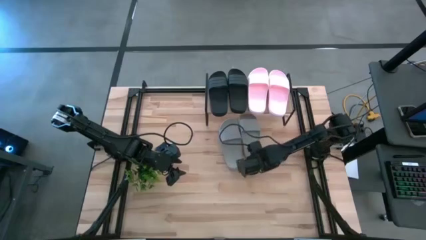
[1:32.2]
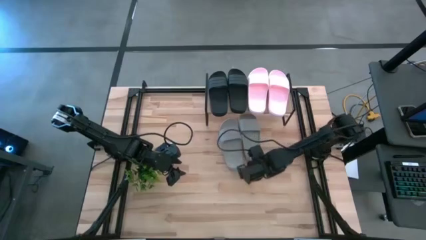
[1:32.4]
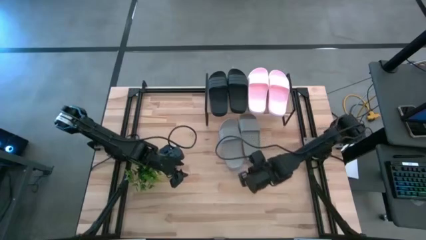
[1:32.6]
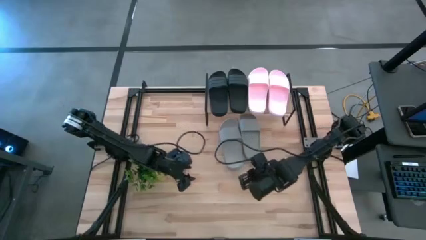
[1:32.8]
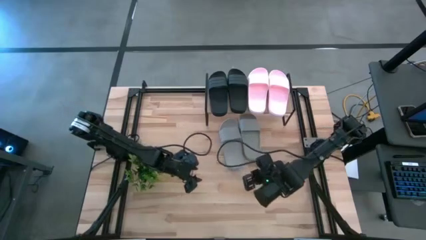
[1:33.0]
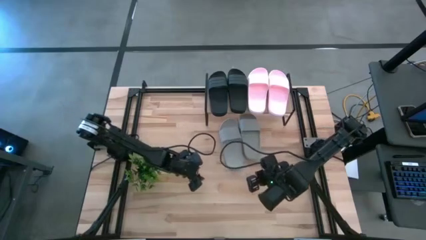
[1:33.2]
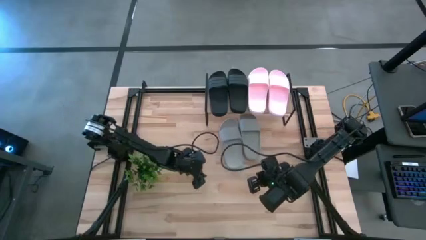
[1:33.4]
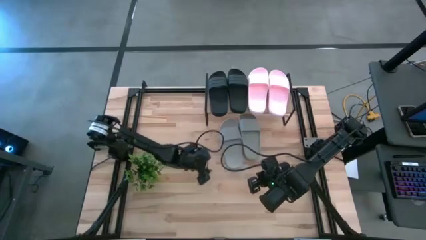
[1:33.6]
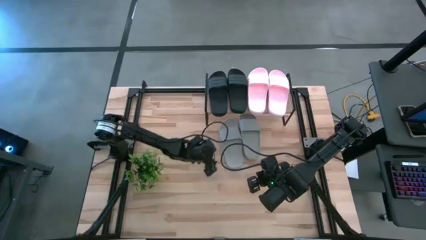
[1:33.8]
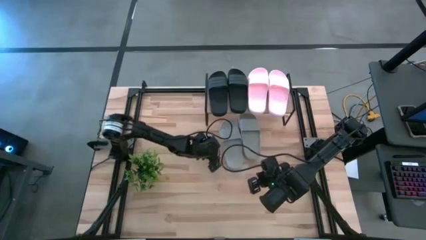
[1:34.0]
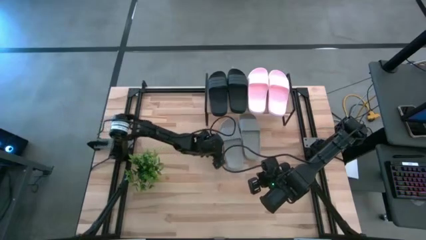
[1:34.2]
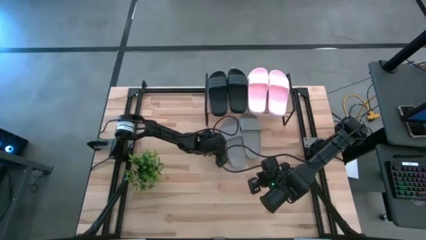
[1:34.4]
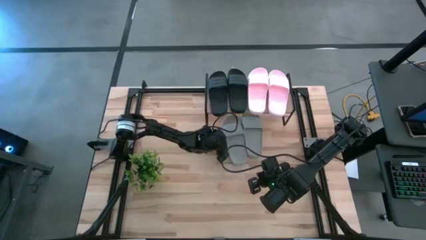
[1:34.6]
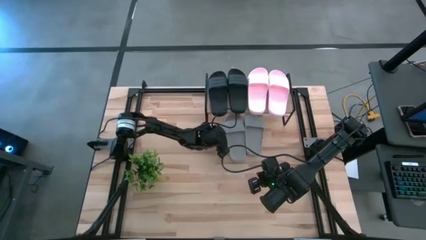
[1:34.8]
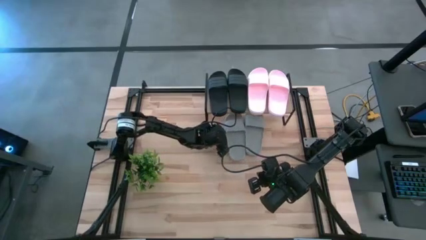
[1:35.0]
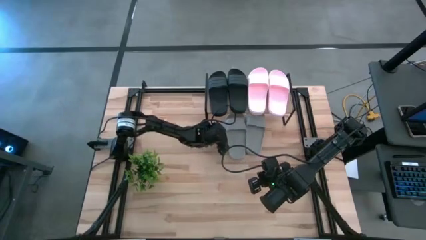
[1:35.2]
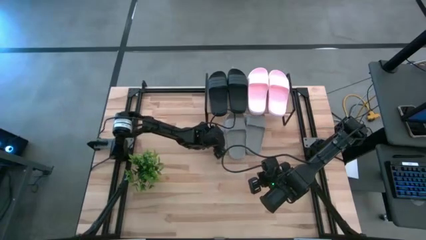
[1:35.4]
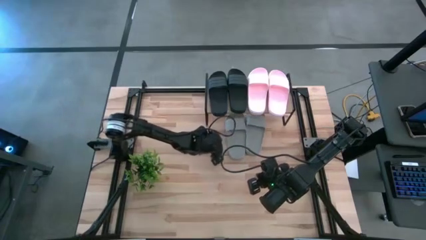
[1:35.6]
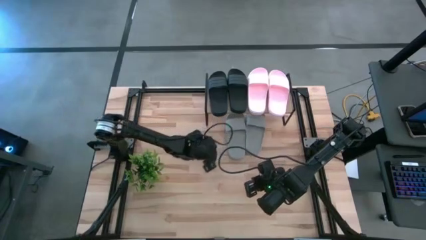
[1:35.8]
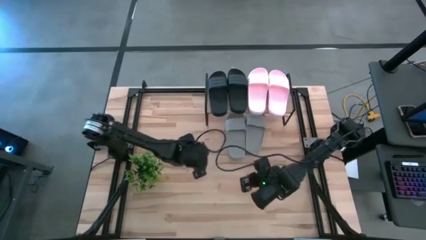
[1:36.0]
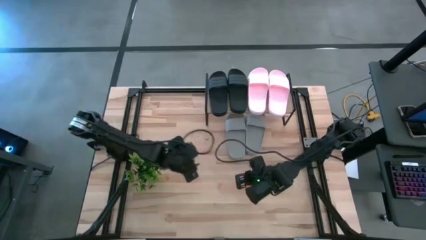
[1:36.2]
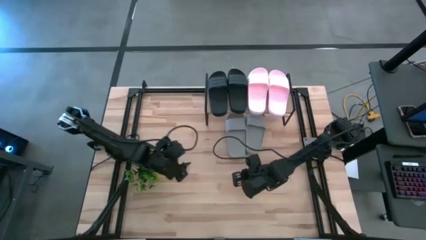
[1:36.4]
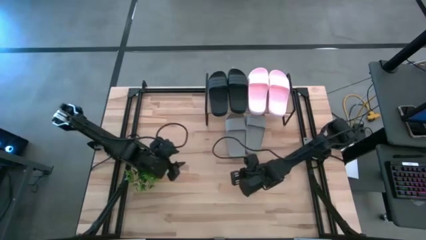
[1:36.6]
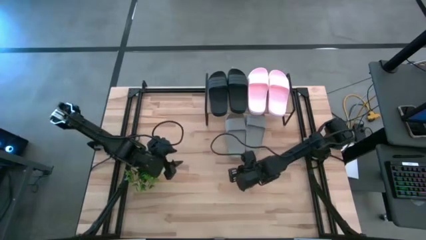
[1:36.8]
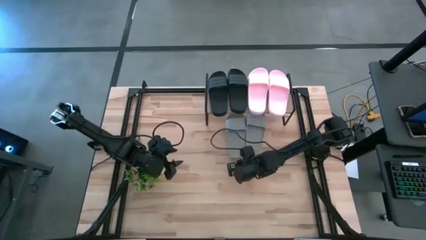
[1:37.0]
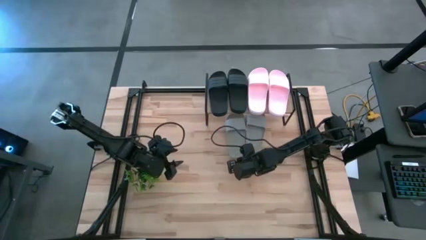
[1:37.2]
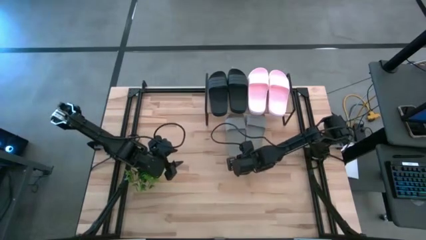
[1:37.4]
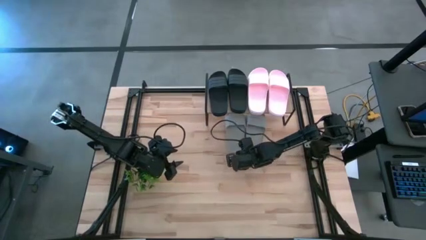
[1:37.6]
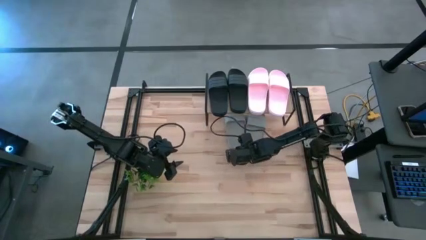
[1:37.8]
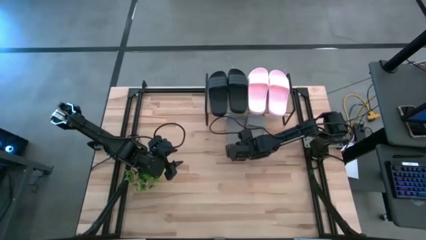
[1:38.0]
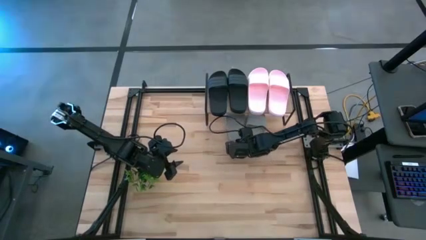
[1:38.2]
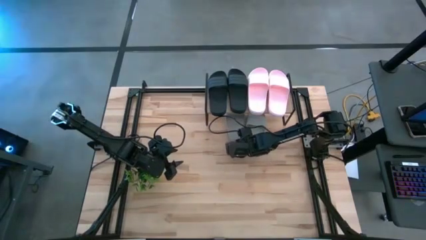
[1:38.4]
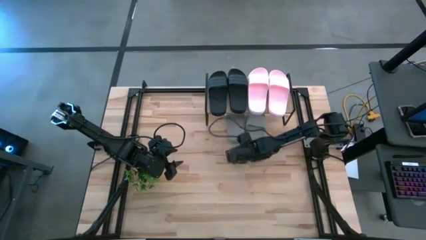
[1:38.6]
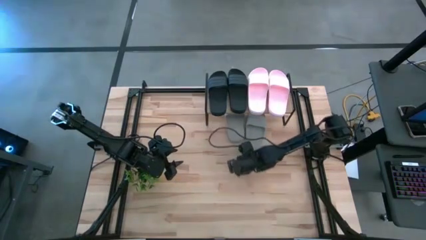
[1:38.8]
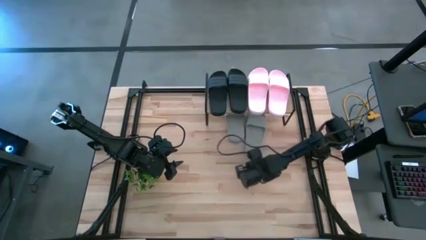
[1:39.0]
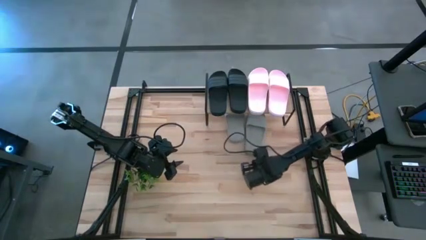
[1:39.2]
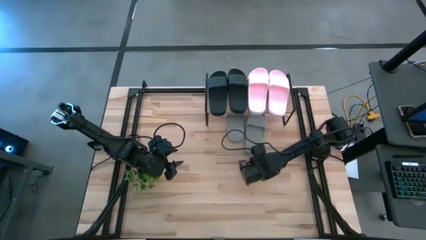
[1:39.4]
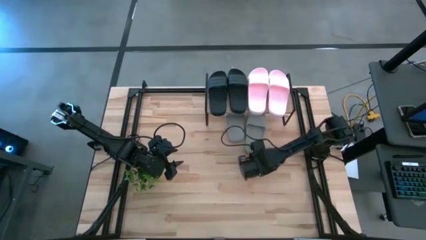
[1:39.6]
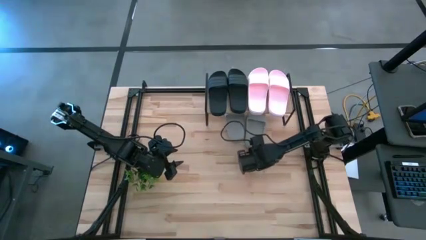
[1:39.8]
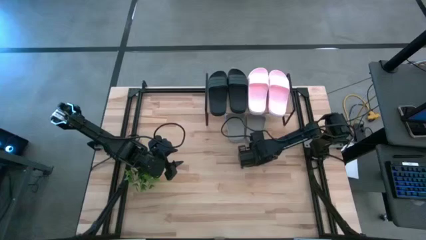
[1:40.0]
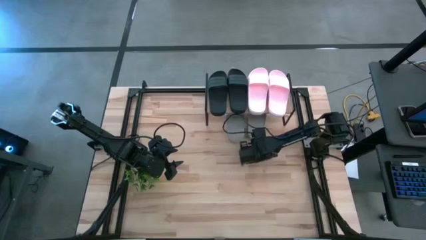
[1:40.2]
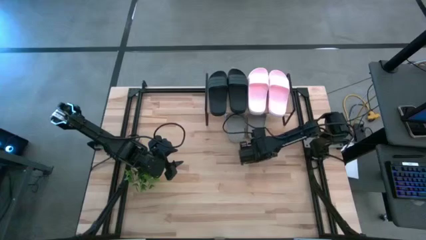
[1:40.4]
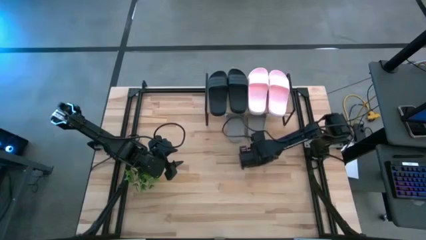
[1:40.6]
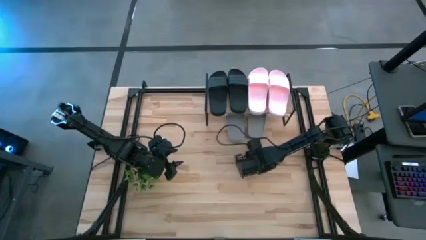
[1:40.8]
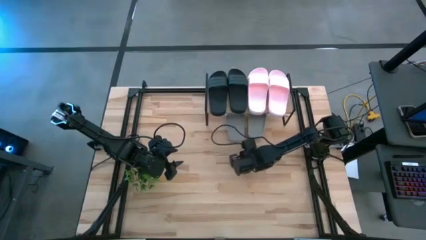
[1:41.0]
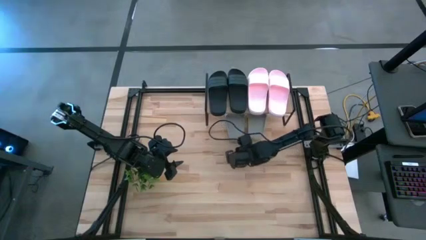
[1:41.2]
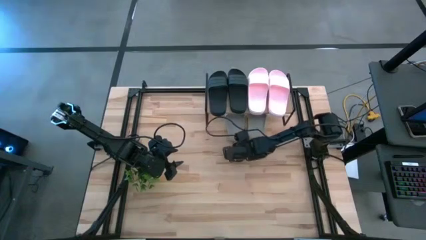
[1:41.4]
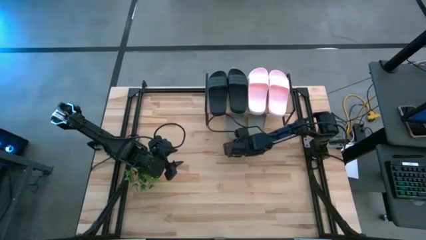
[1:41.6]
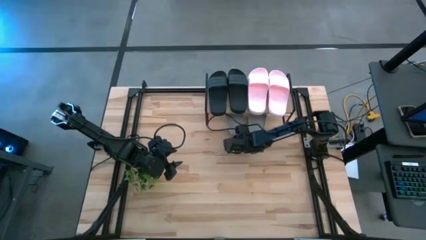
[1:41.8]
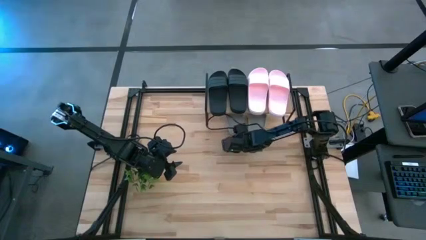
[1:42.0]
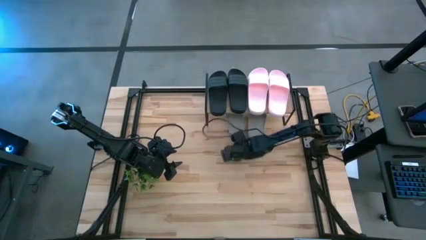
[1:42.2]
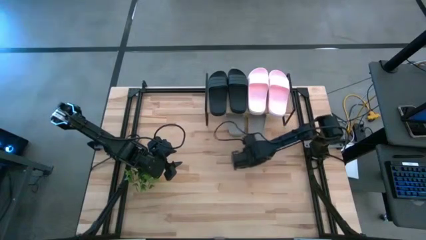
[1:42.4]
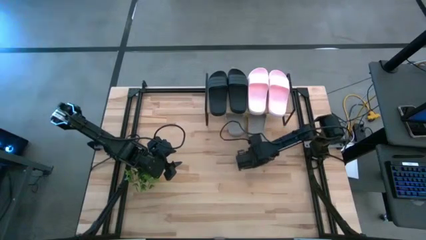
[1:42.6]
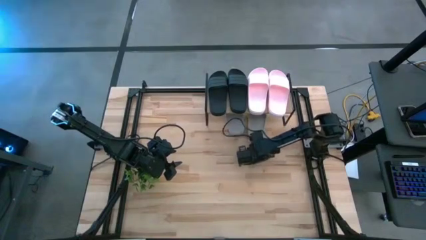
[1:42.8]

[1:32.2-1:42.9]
Task: Pick and place slides into the shelf
Adjust the gray slides under the shelf
